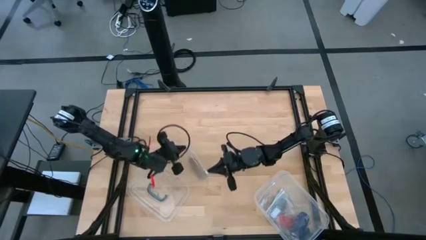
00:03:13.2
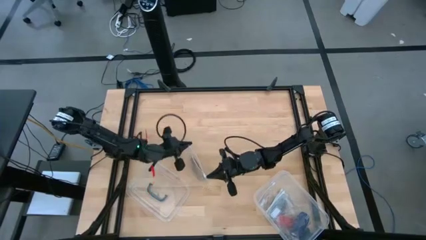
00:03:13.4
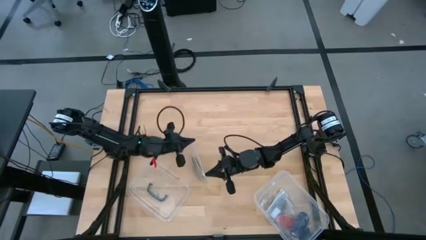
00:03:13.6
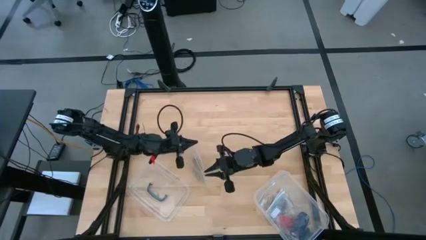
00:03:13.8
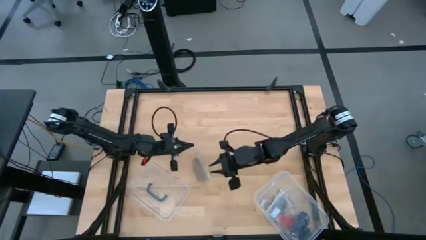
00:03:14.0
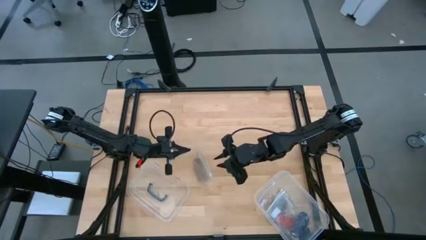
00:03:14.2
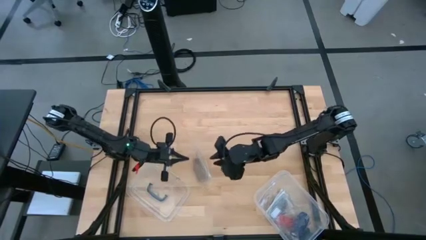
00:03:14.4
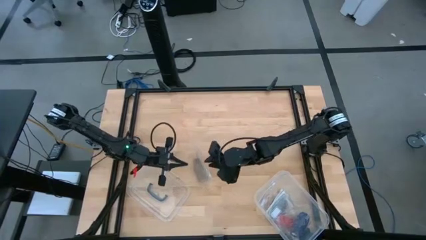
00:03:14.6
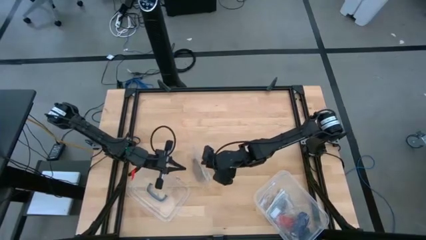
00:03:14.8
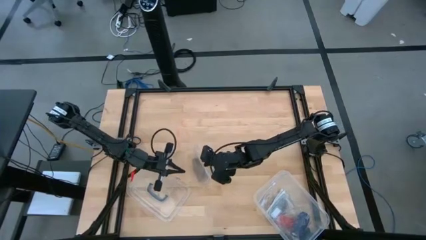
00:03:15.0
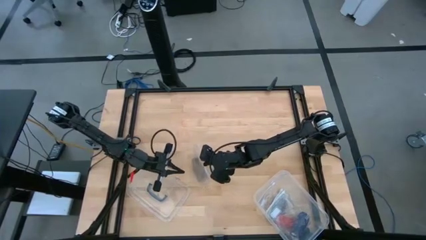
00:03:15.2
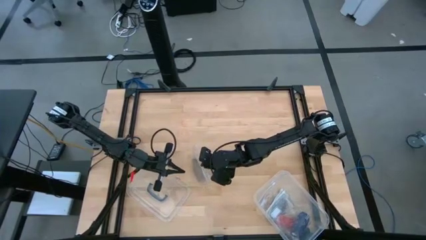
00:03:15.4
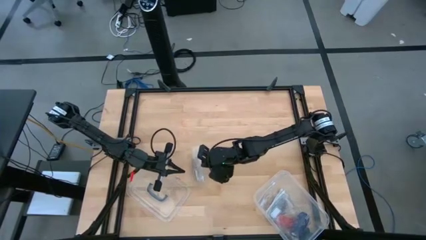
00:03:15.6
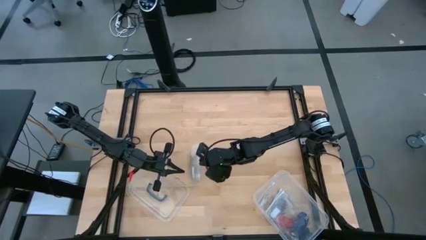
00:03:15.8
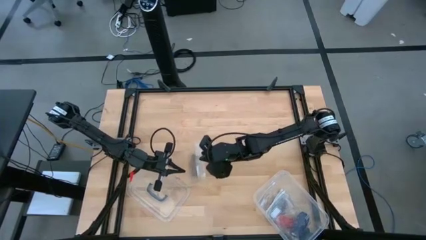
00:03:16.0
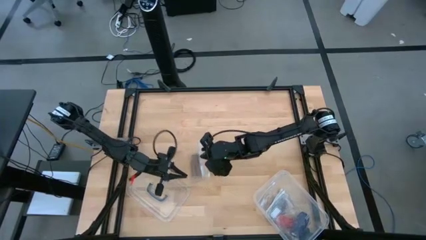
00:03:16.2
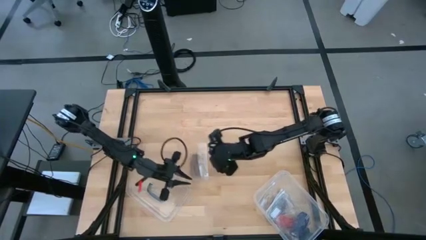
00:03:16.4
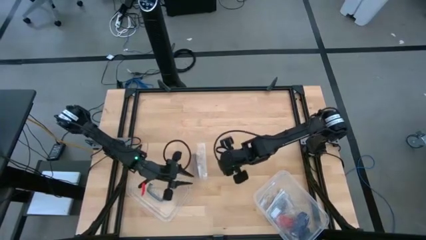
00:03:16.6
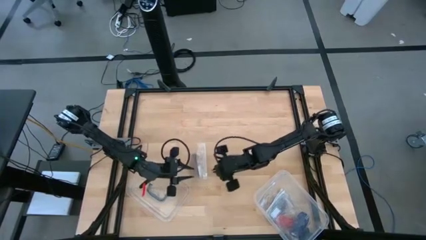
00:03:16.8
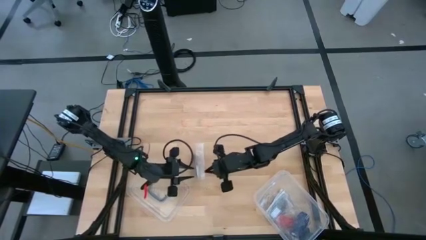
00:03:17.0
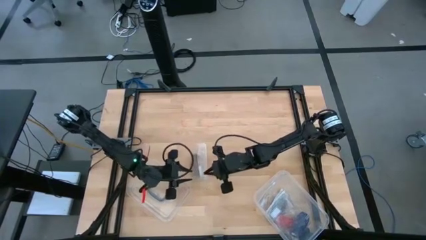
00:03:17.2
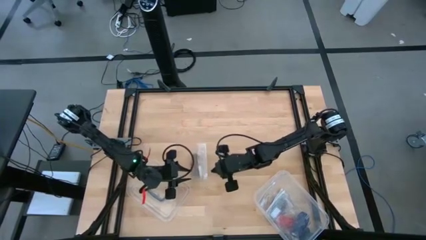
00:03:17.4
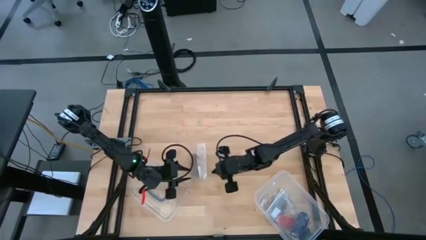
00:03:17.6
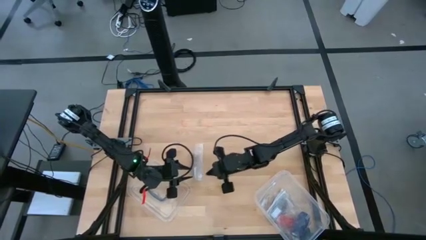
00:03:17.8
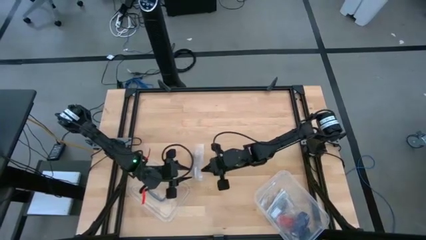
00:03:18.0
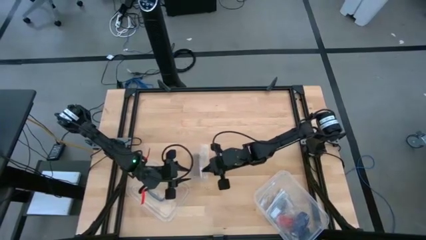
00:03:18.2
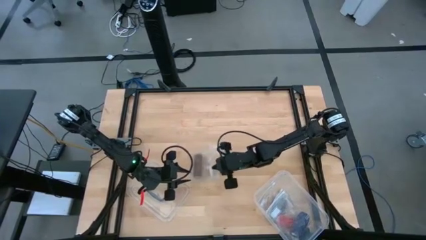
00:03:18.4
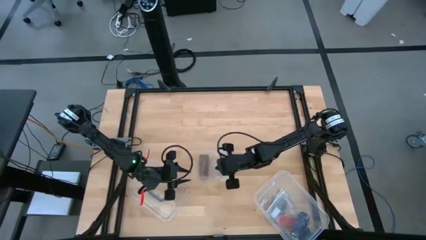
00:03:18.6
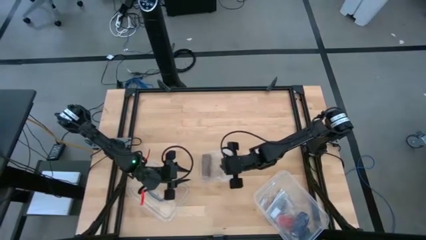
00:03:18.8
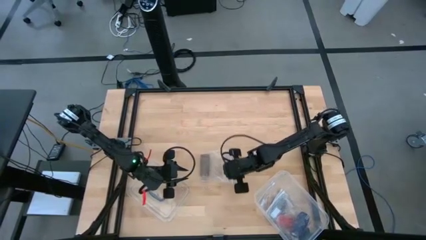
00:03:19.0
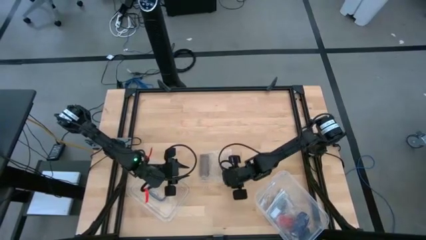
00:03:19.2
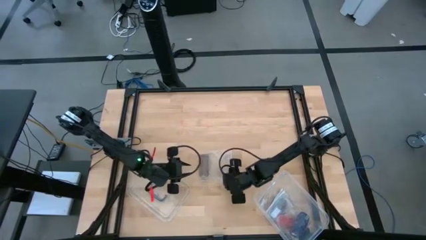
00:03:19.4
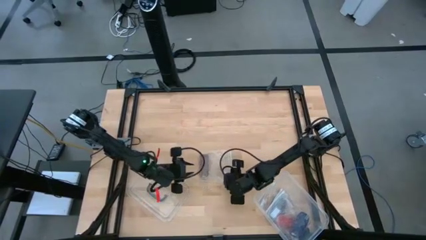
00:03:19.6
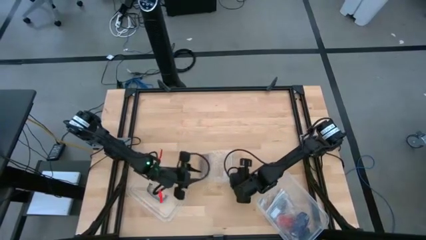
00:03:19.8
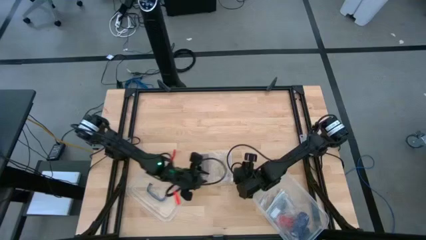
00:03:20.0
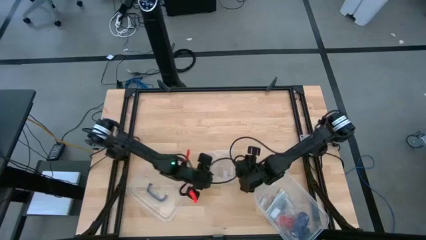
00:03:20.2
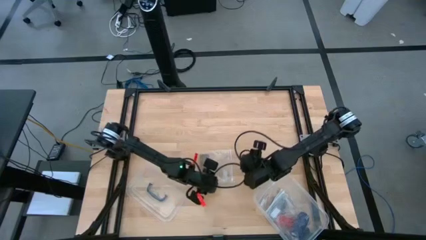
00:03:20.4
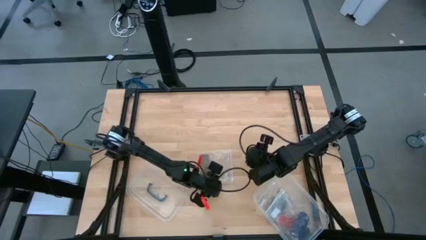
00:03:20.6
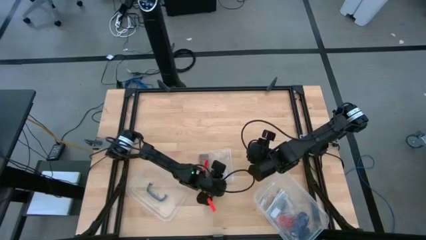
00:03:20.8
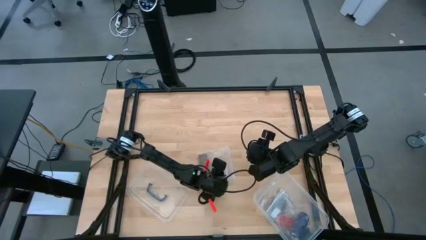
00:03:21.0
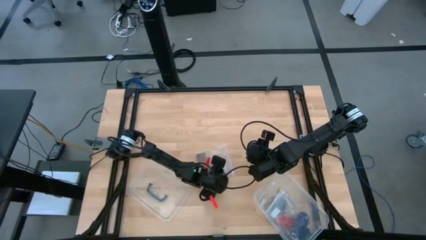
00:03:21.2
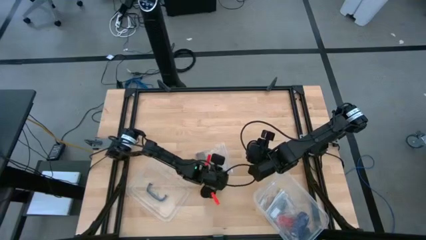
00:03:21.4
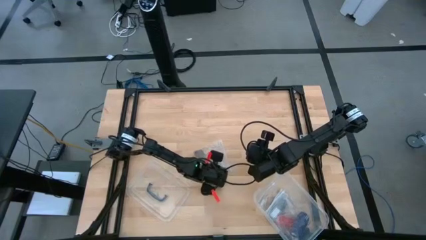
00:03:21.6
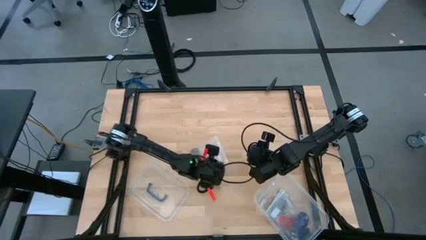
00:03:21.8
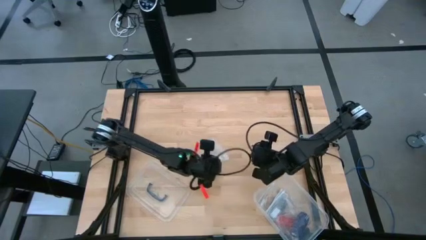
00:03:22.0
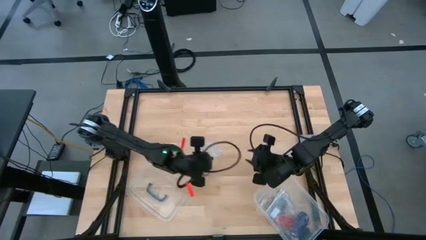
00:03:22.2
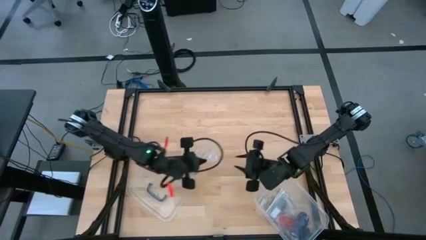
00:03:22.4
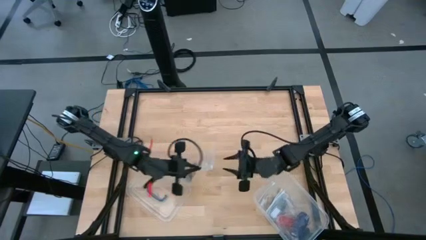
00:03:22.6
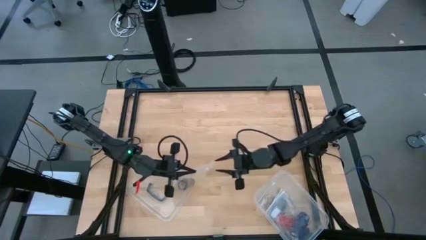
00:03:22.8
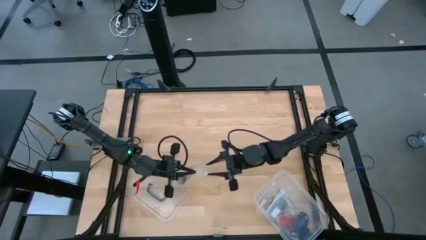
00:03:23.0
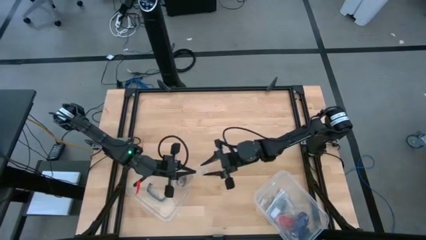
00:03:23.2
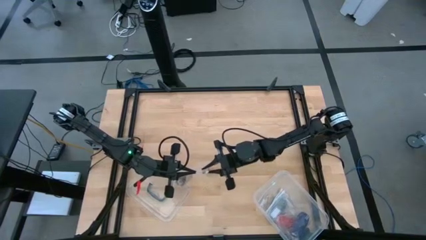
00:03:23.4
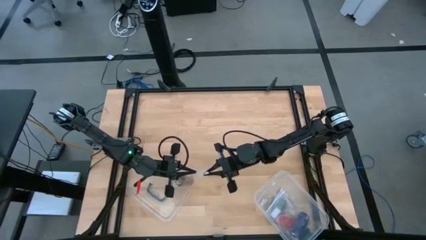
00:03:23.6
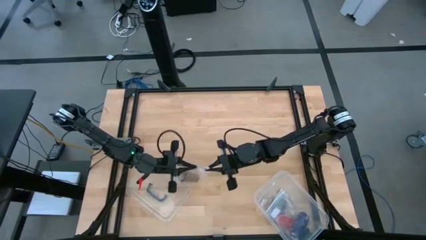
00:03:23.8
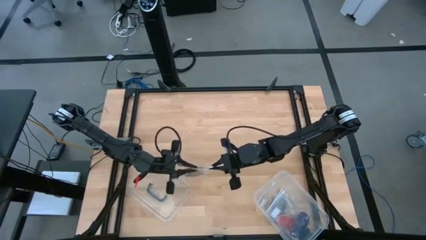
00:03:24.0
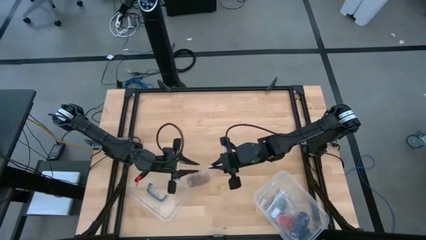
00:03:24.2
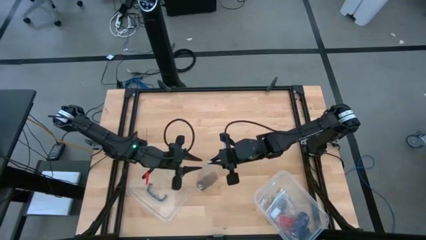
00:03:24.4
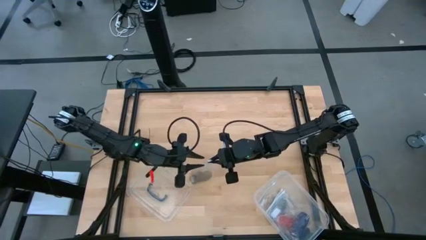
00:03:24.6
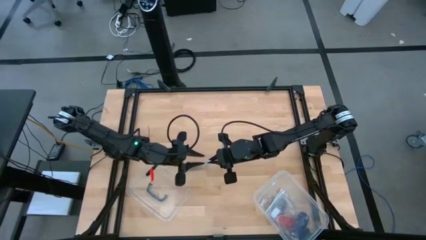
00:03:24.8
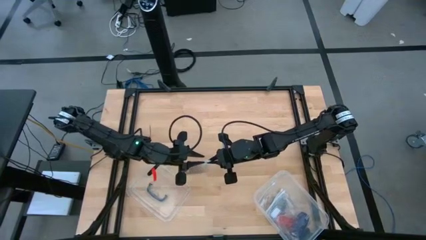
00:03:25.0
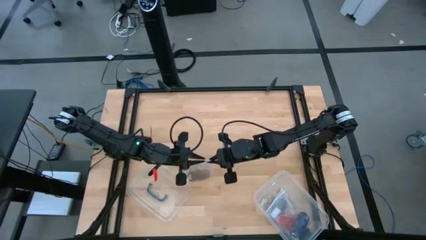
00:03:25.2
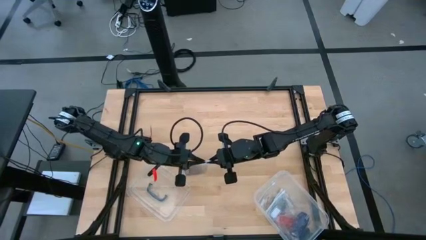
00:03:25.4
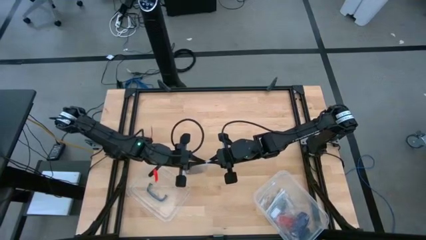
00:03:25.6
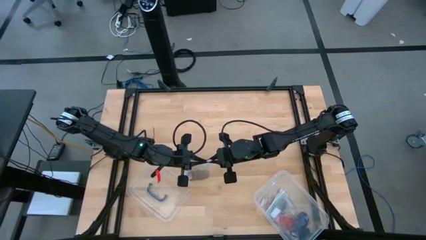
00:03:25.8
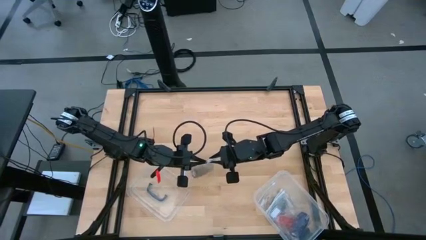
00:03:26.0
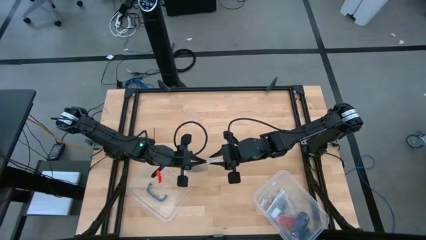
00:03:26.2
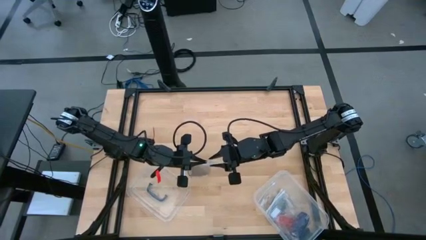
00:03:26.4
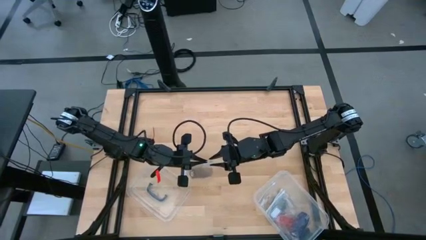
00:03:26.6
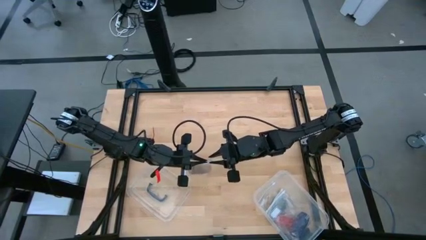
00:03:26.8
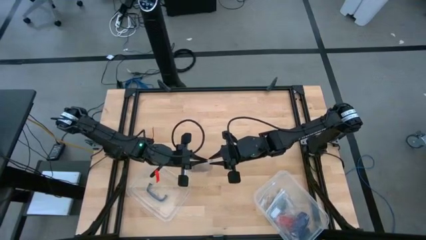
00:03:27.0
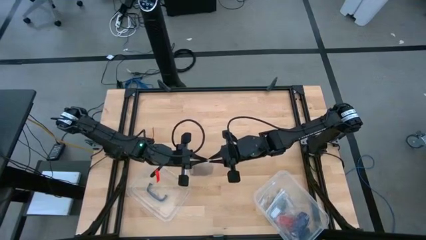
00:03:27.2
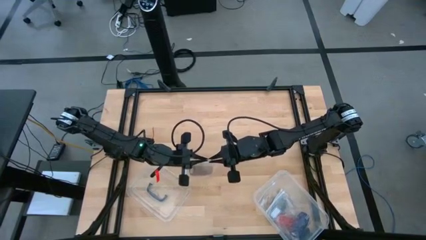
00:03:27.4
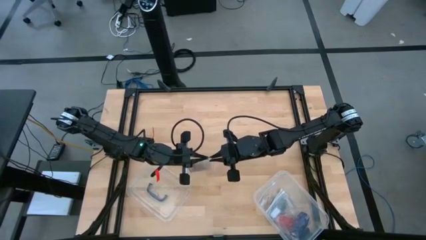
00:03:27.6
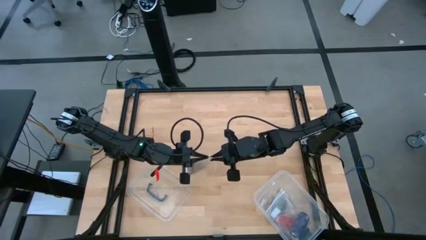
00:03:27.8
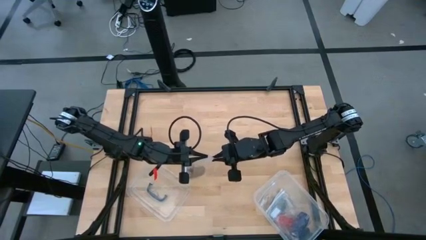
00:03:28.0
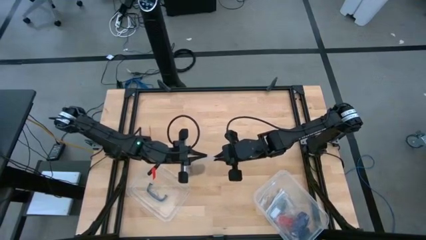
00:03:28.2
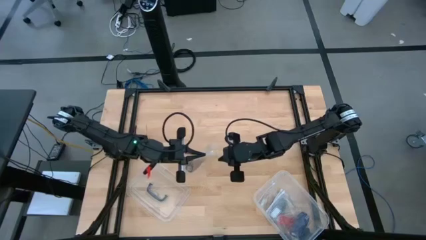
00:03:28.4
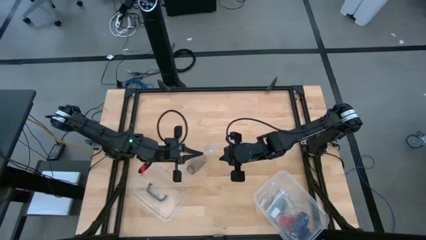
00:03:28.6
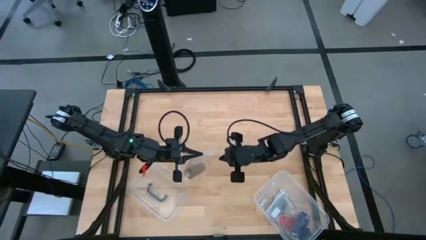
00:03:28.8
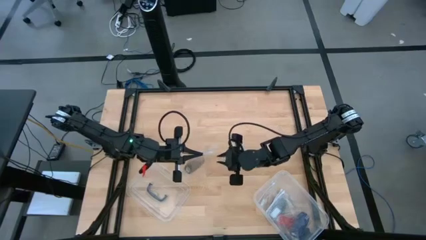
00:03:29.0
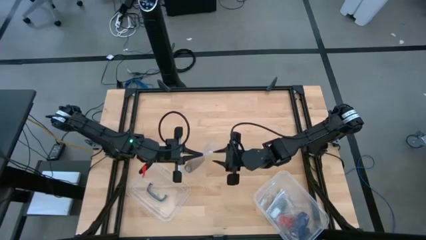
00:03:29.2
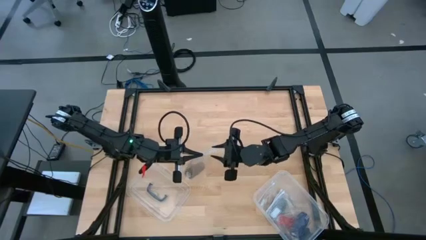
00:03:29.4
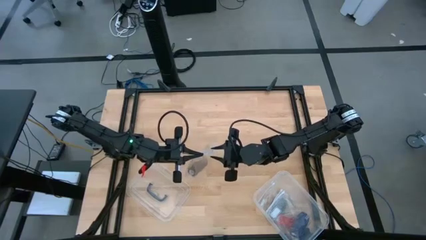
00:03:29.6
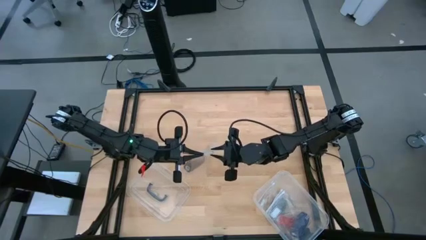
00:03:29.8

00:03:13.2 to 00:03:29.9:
Task: Roll bandage
Close the transparent zip bag
